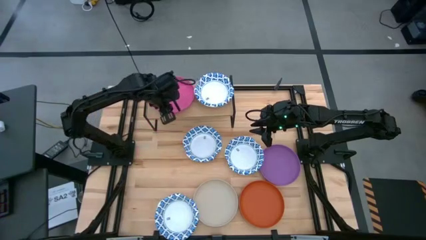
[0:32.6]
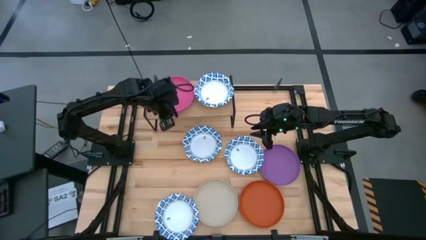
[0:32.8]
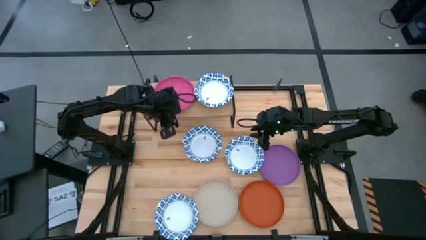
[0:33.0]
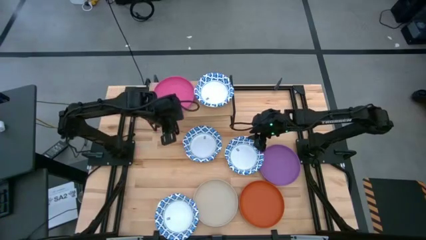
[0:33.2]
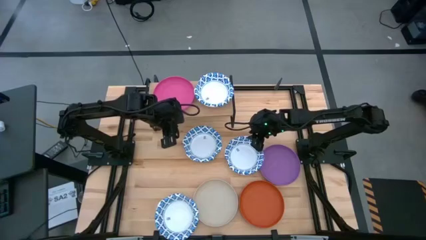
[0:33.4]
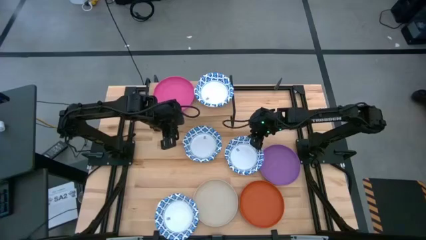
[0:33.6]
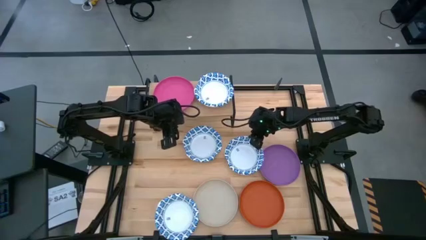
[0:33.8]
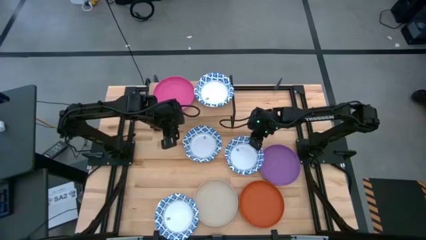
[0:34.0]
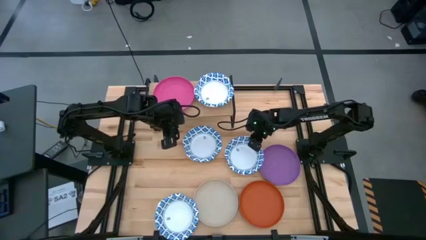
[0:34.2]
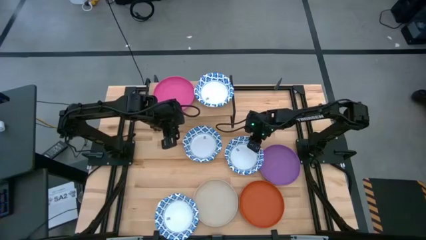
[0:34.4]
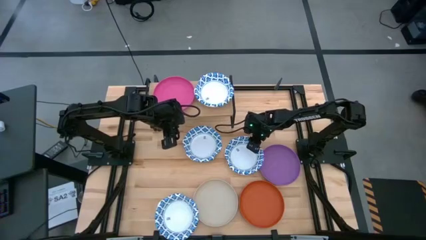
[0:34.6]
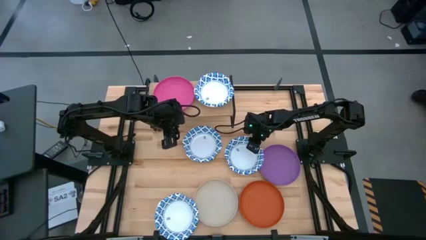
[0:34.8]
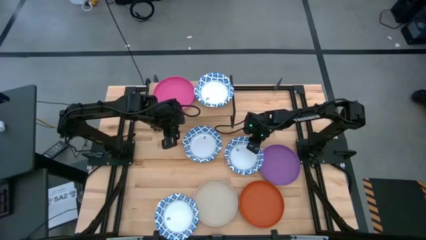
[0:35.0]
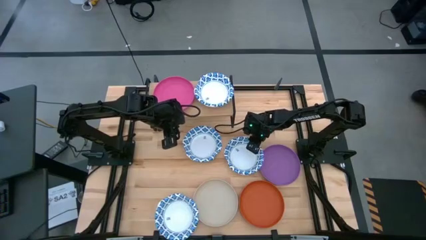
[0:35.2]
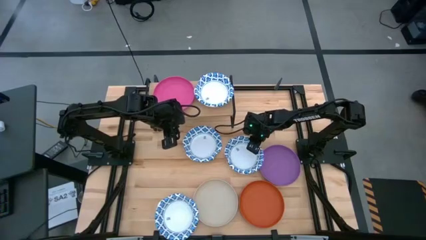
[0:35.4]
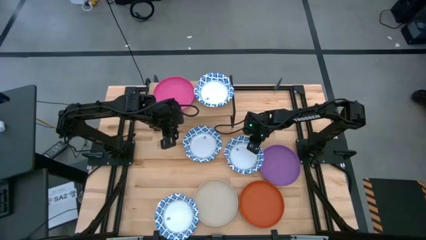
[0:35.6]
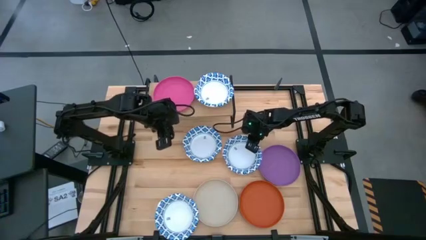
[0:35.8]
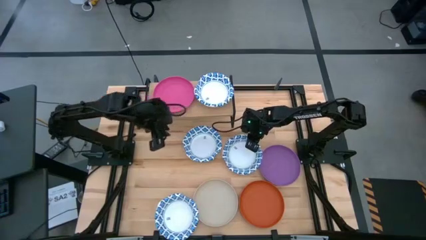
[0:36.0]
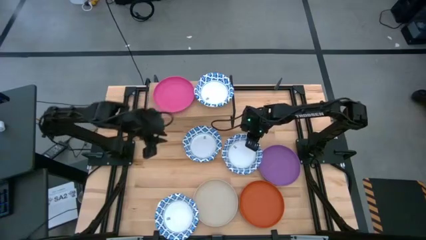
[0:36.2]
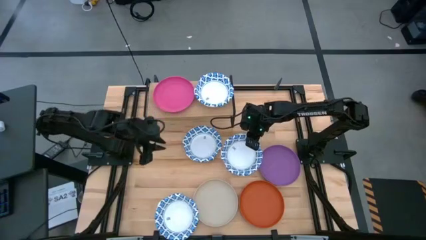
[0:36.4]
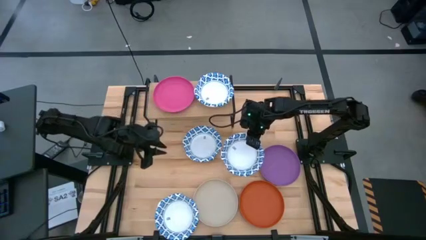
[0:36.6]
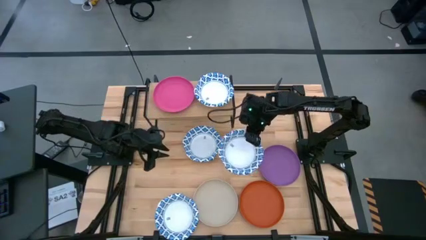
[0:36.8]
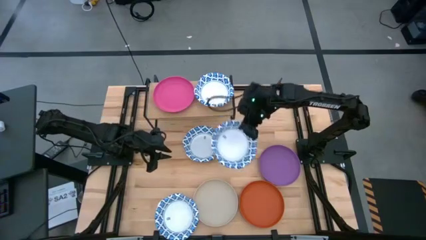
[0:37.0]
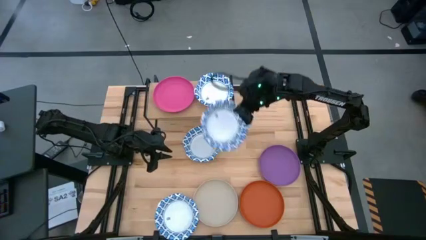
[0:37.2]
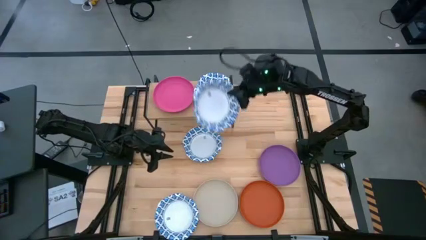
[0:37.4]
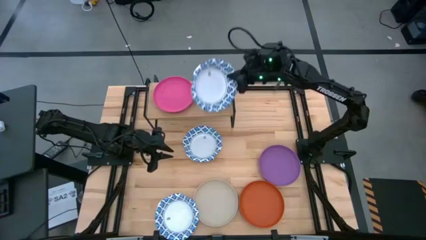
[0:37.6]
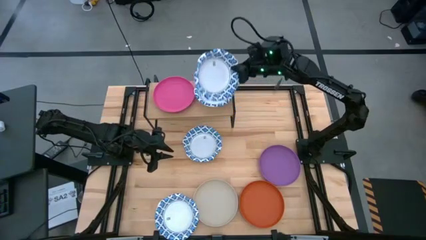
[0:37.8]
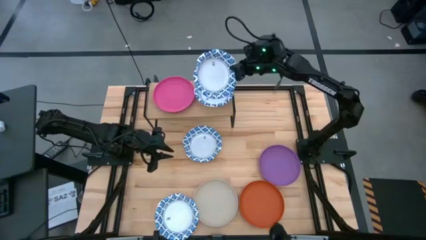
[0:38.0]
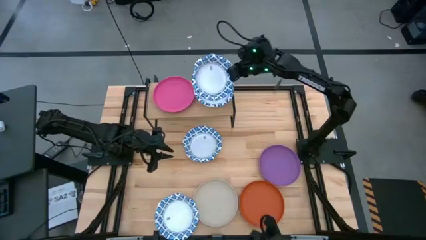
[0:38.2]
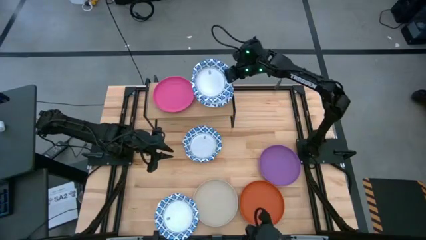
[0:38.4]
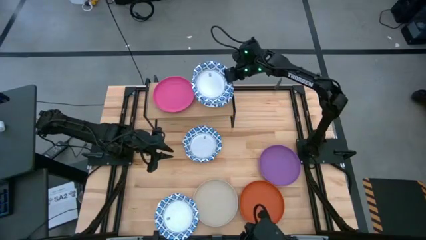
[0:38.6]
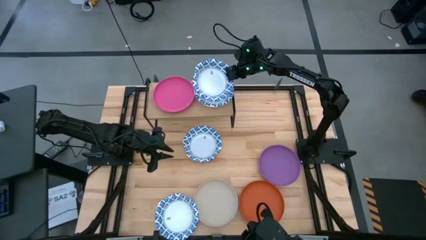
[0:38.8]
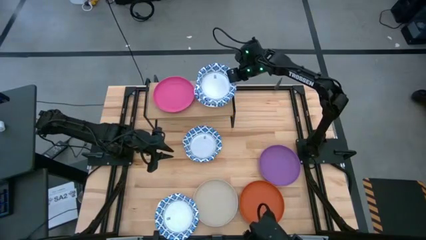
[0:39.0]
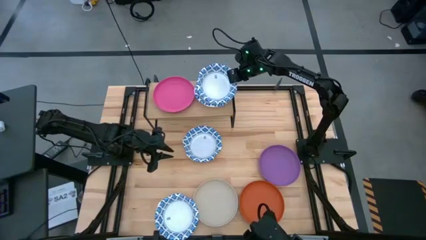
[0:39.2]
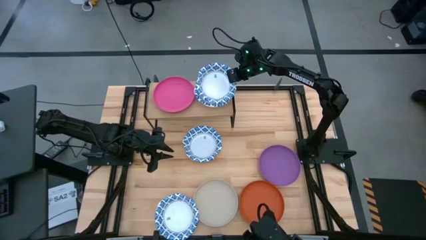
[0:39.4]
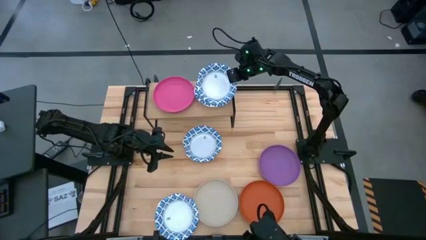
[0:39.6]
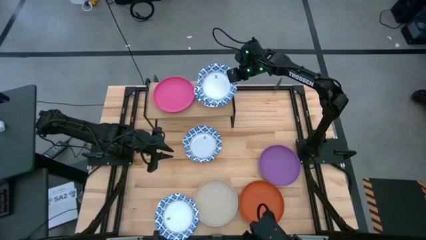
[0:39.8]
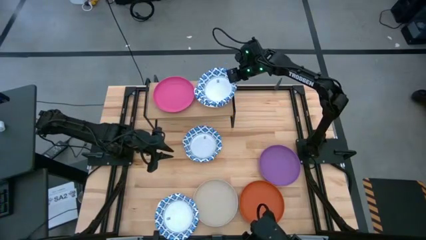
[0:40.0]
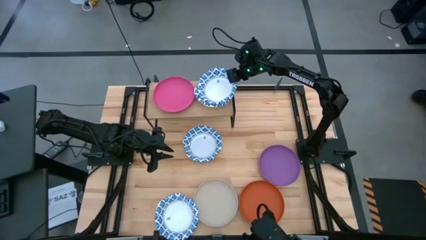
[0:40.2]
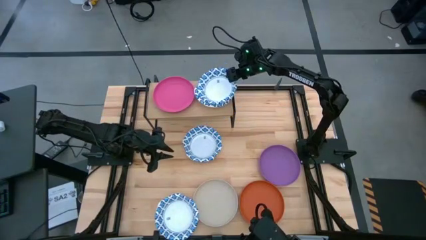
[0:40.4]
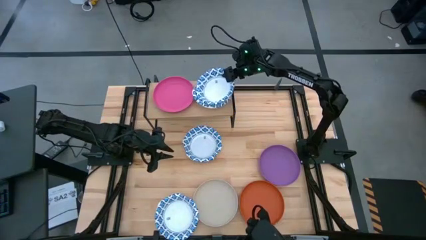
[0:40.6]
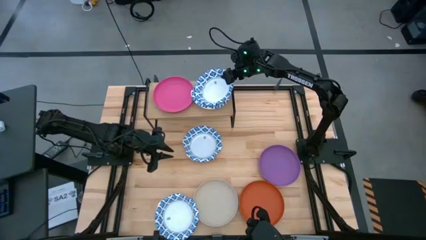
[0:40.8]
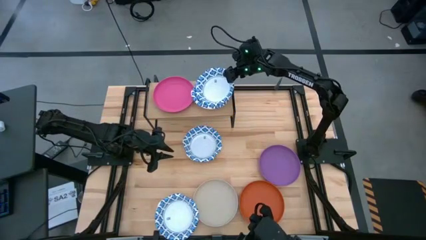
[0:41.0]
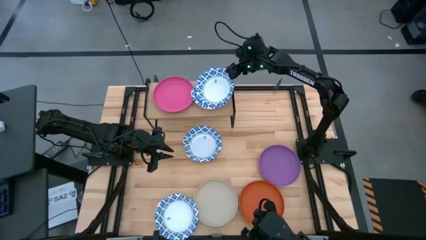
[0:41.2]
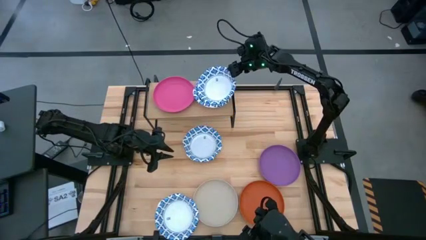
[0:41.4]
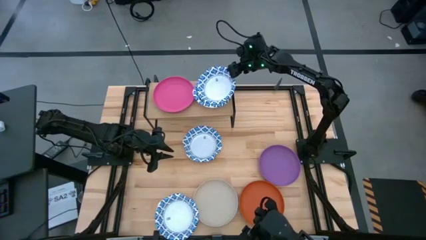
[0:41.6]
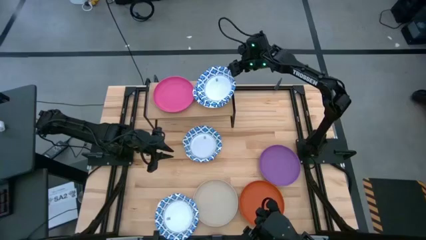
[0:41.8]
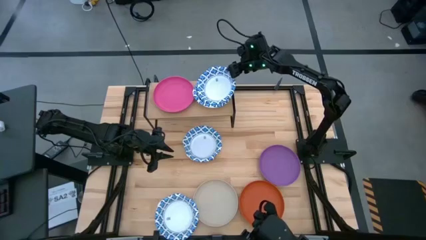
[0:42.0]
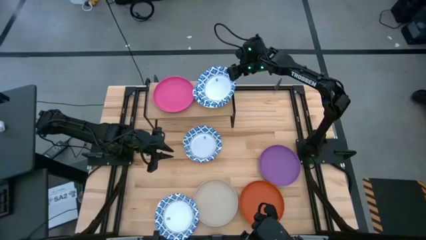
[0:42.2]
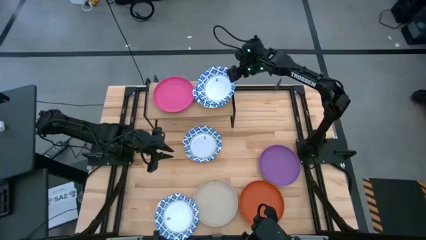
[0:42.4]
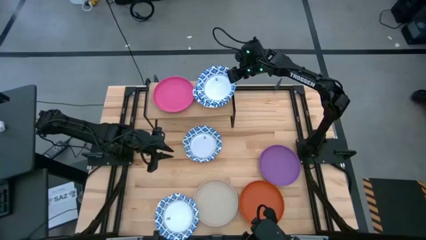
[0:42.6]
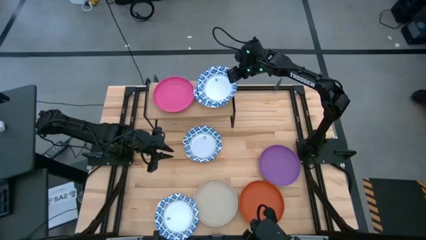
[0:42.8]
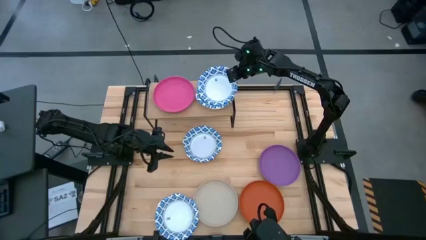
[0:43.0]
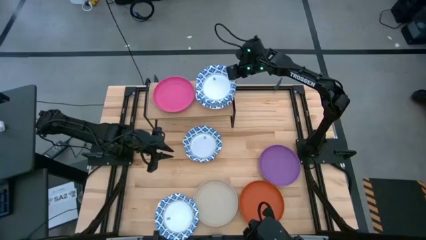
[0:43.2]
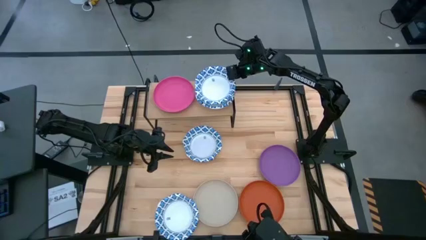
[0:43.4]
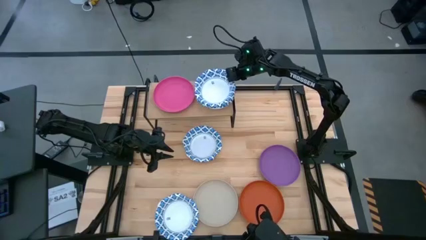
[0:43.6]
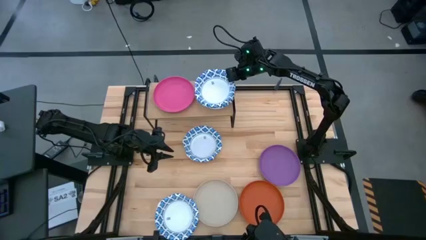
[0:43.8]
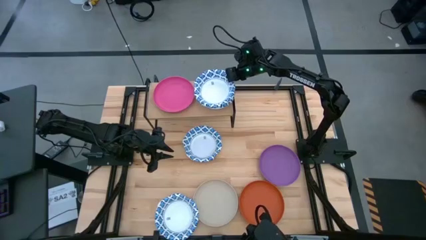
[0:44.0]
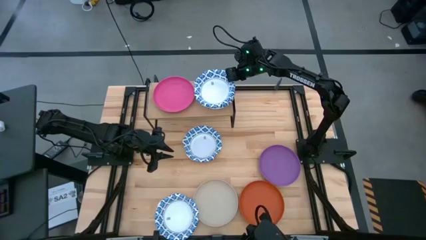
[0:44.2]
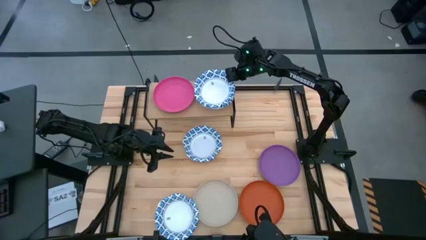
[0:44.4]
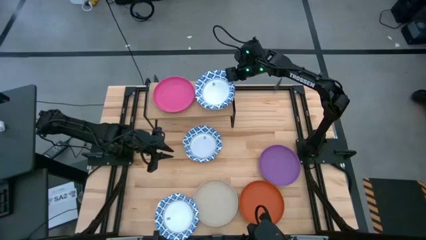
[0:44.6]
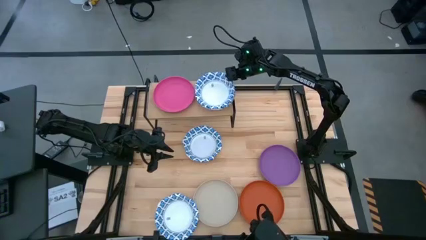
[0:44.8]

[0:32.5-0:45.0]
Task: Place and stack plates onto a shelf
Stack the top right white patterned bowl on top of the other white patterned bowl on the shelf

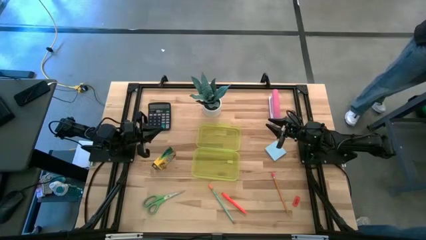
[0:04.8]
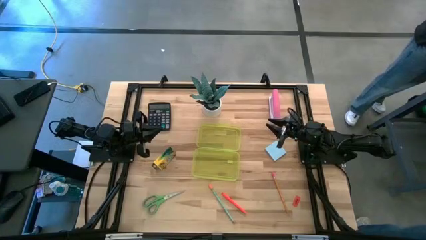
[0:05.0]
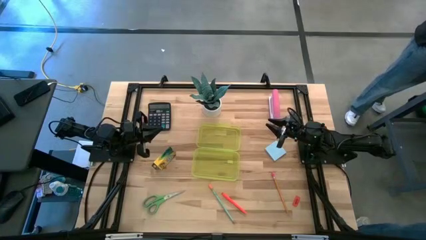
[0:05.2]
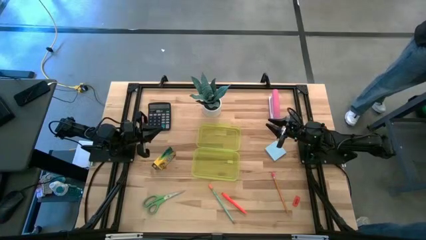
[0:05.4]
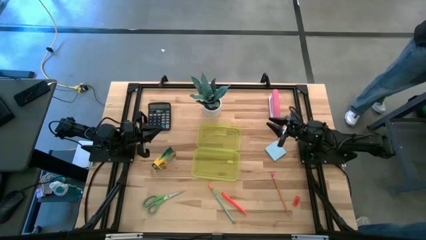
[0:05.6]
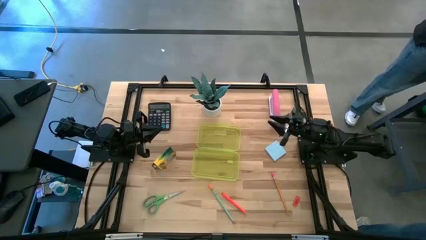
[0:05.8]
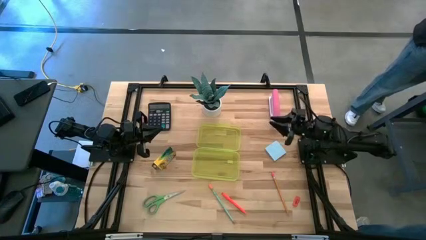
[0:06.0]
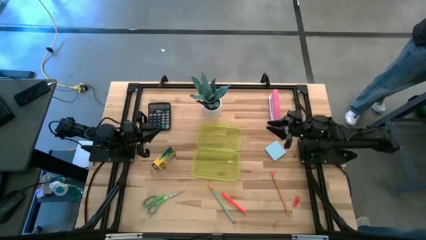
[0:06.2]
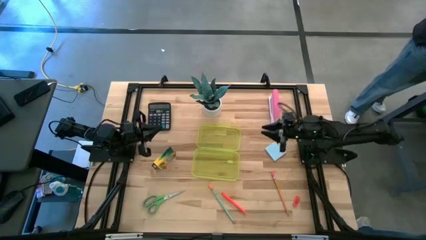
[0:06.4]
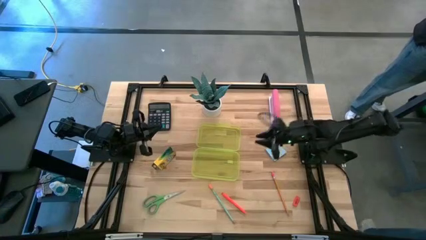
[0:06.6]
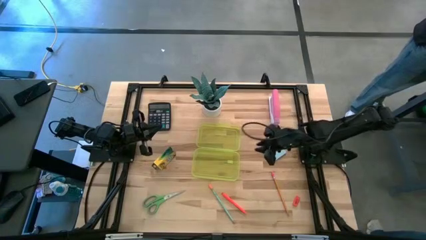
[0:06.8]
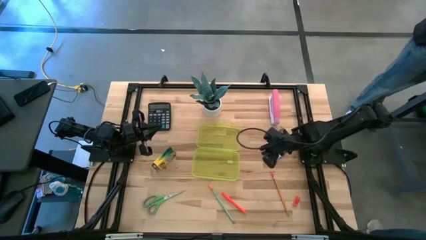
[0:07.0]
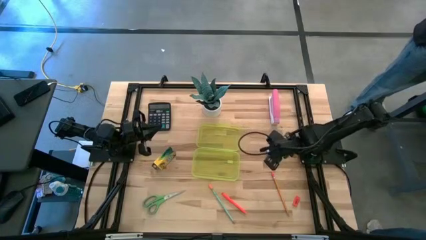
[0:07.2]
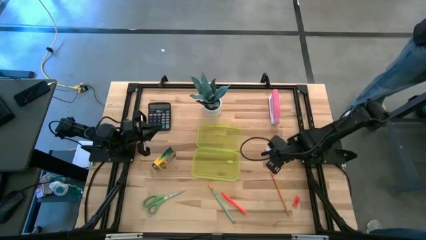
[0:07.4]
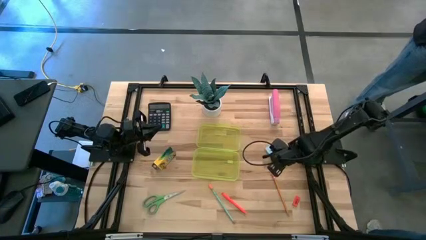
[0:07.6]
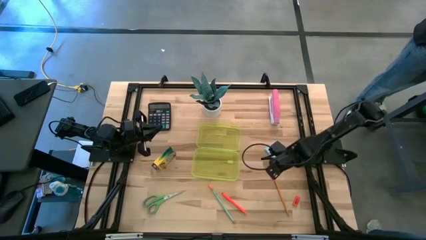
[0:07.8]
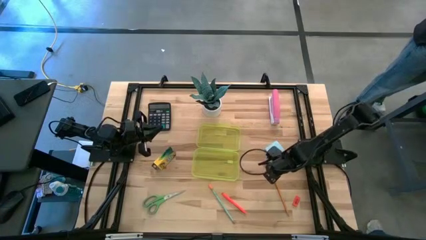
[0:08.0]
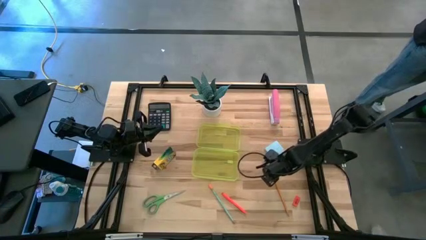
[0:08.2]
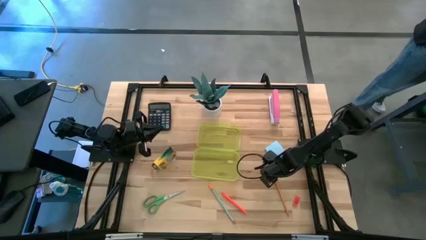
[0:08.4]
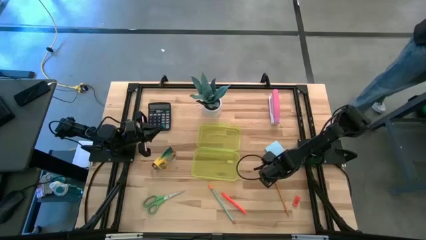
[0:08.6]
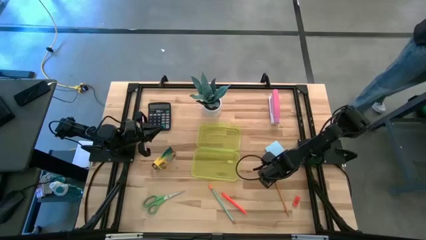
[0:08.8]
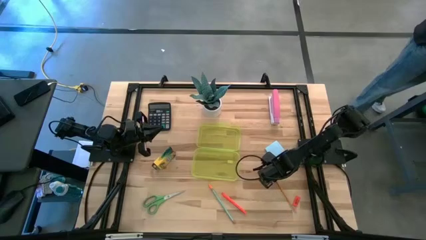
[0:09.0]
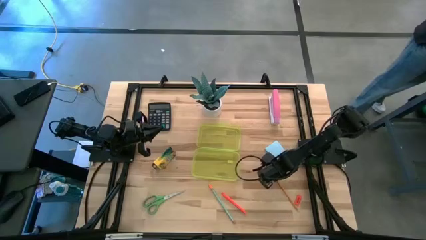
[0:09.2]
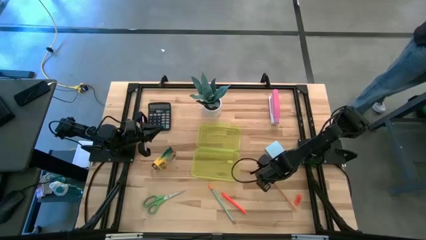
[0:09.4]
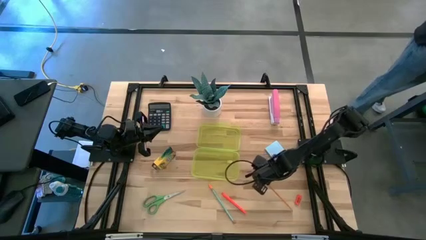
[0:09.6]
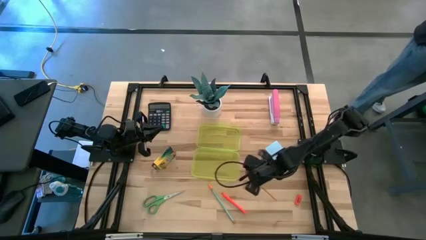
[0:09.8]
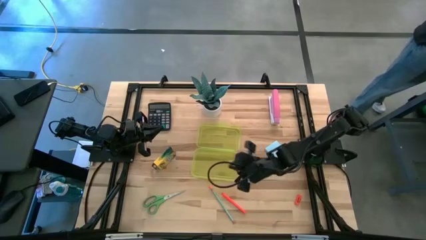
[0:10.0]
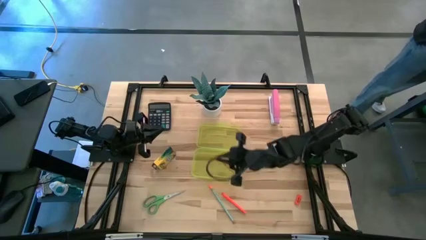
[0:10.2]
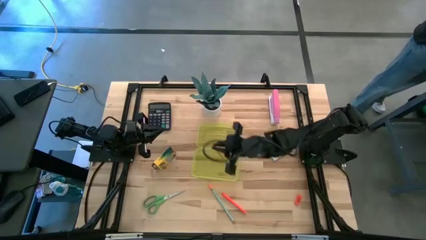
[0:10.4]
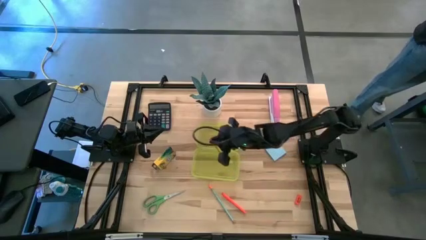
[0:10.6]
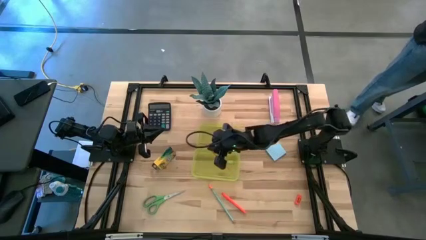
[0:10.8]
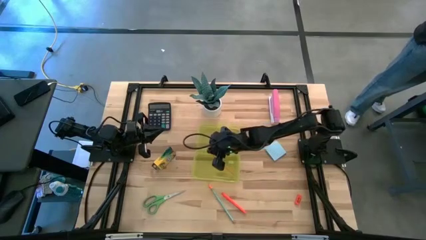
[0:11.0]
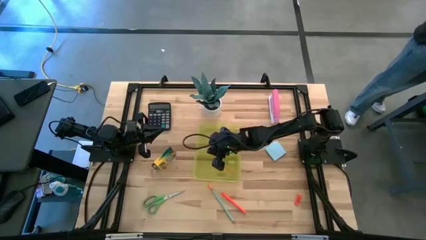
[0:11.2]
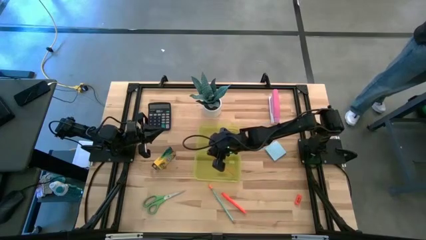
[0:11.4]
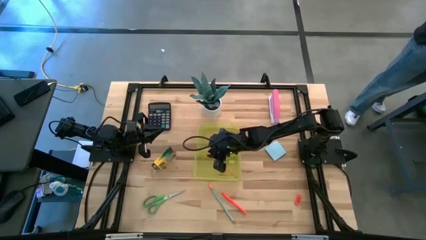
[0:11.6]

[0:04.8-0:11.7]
Task: Pack school essentials
Put the yellow pencil into the yellow box
